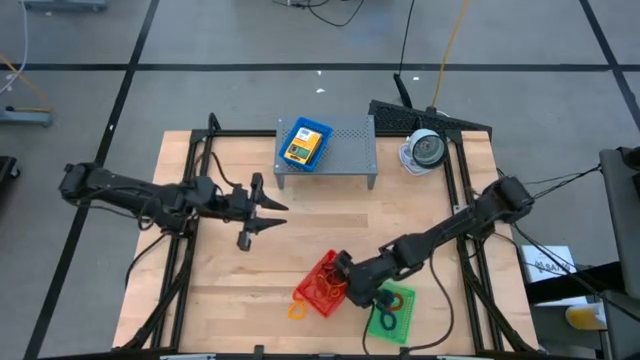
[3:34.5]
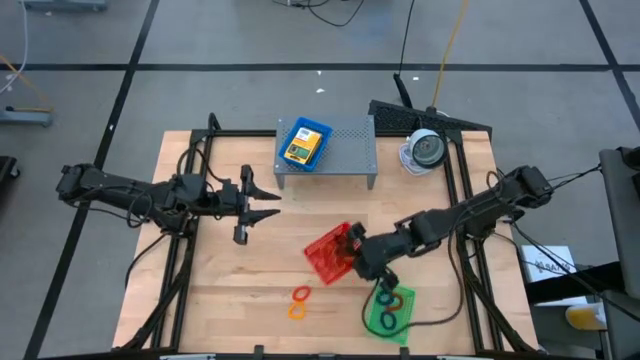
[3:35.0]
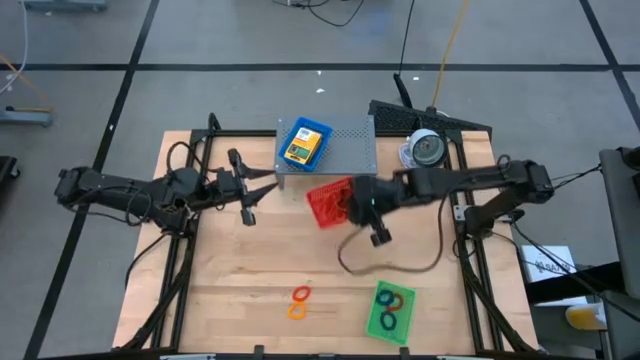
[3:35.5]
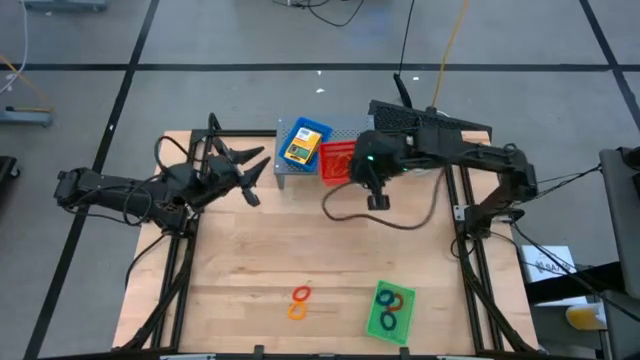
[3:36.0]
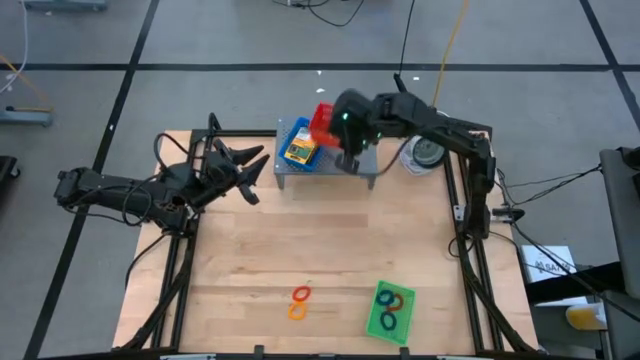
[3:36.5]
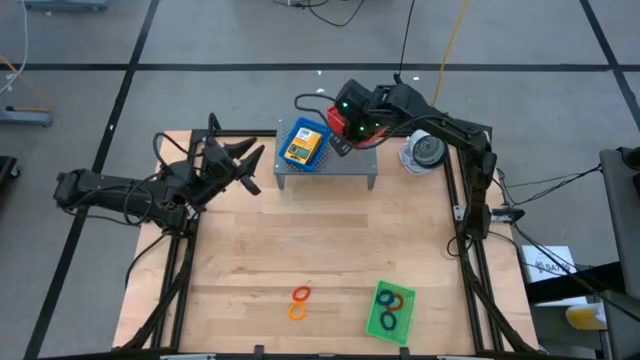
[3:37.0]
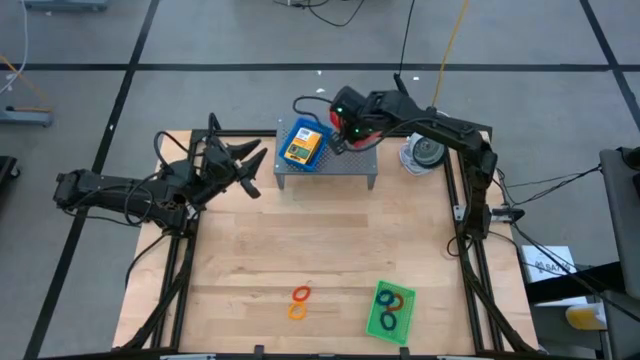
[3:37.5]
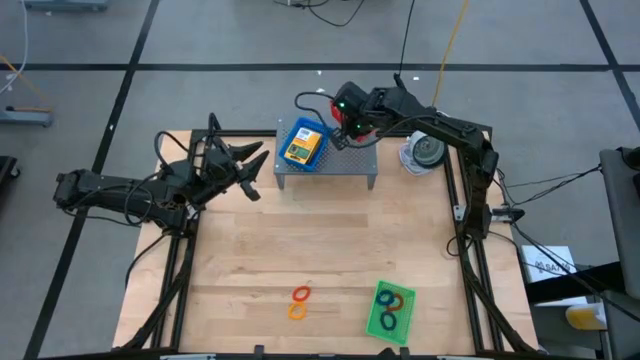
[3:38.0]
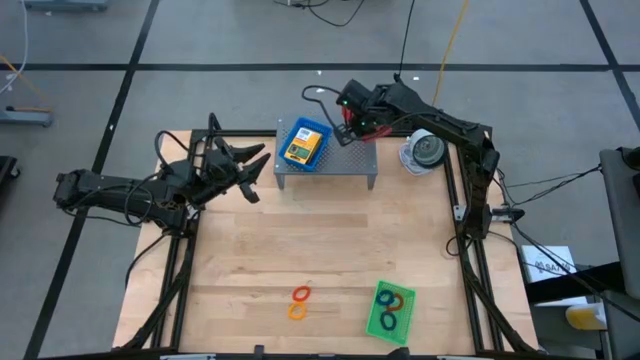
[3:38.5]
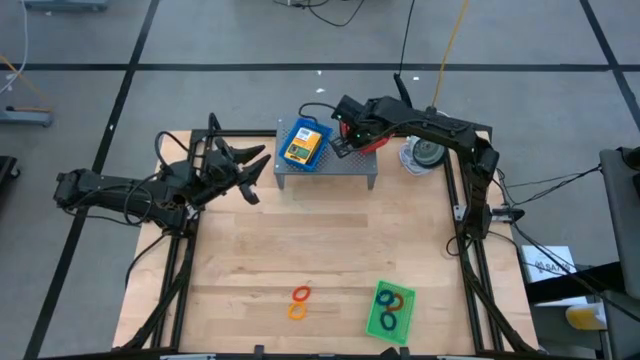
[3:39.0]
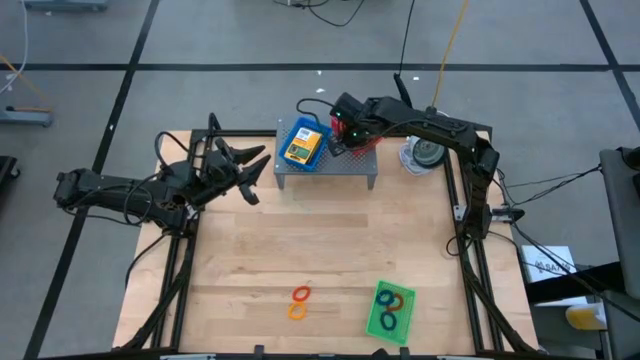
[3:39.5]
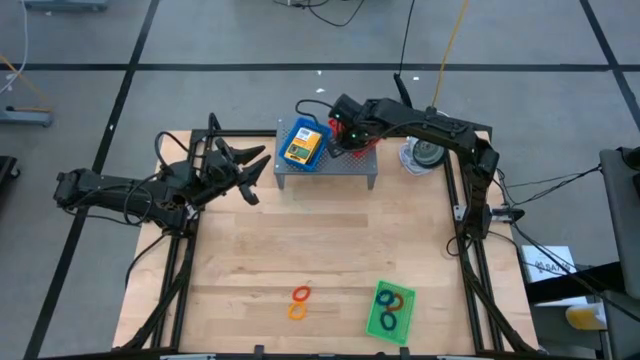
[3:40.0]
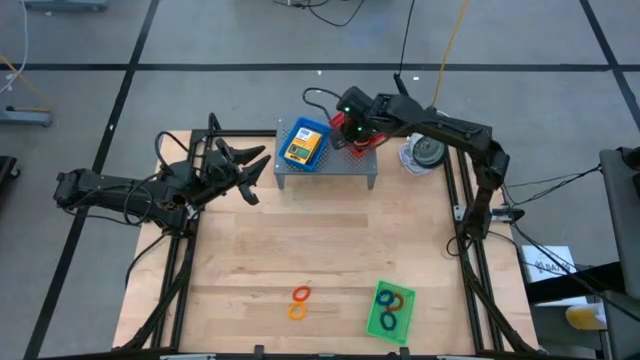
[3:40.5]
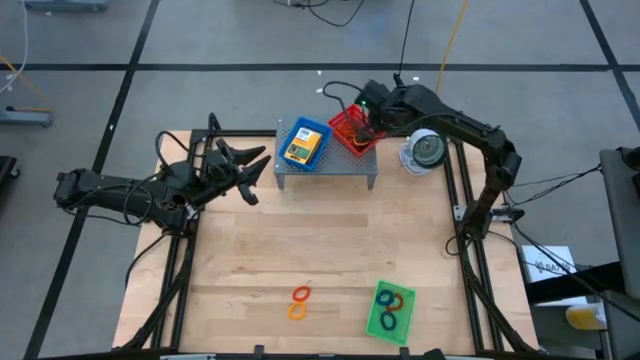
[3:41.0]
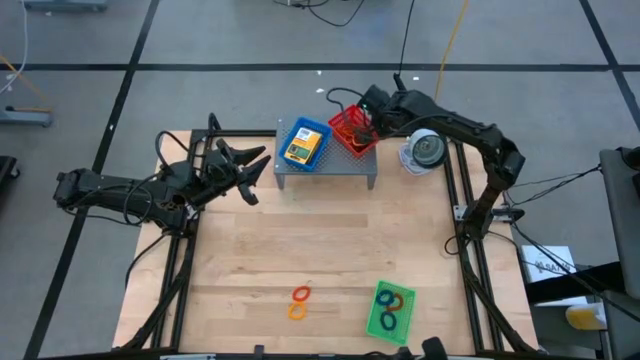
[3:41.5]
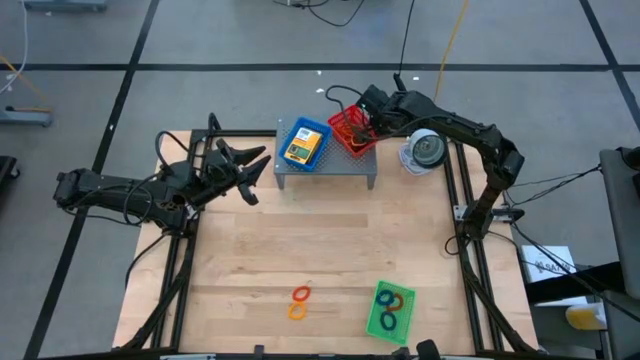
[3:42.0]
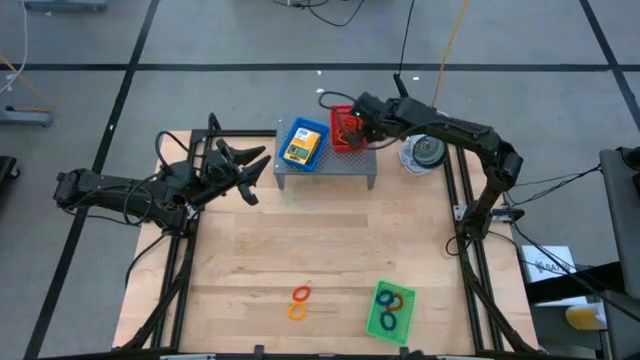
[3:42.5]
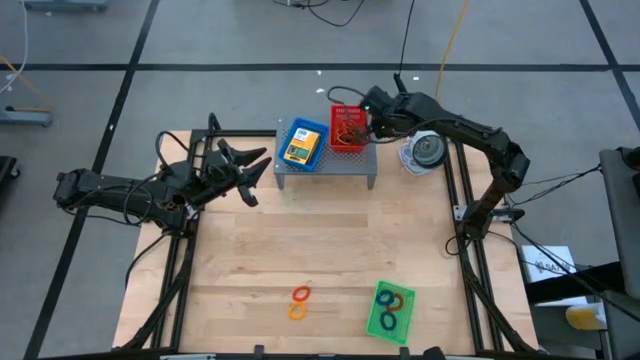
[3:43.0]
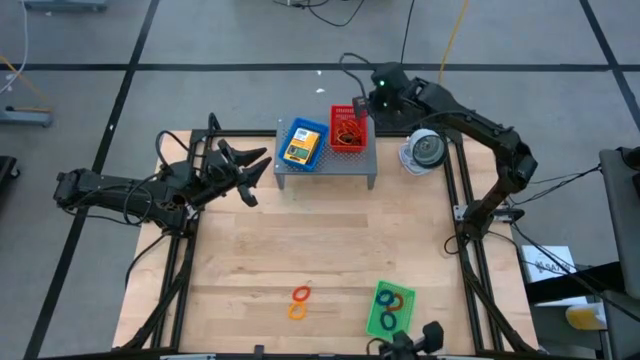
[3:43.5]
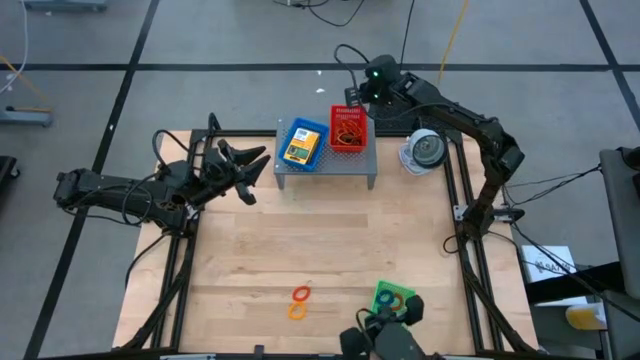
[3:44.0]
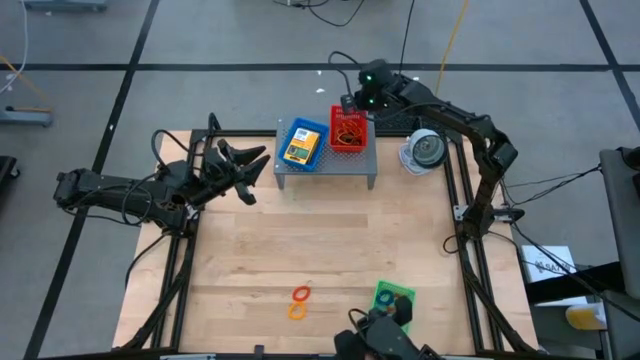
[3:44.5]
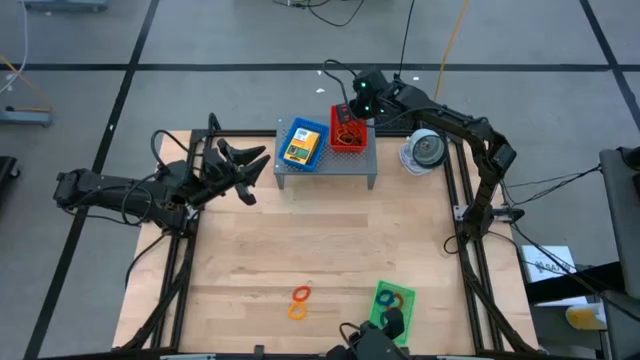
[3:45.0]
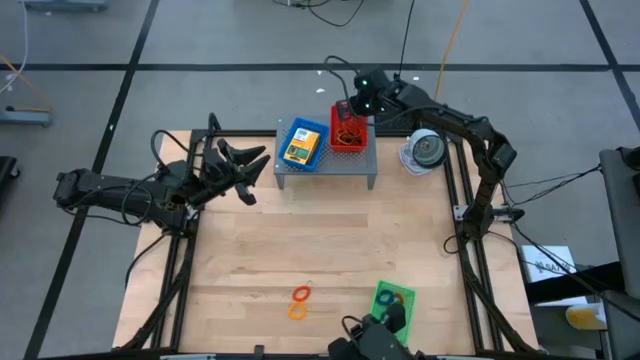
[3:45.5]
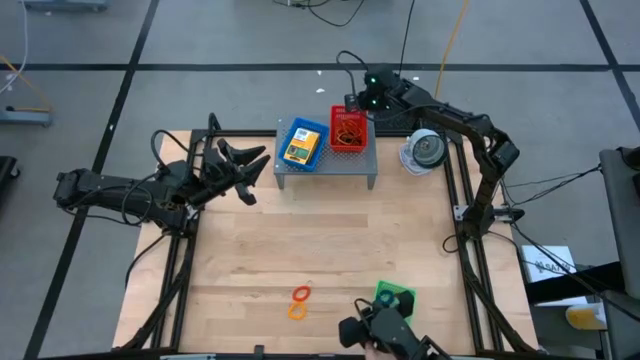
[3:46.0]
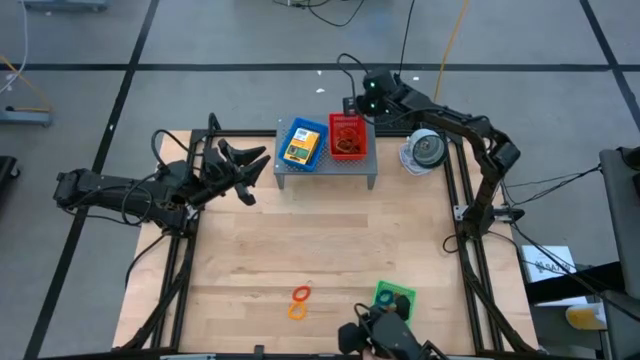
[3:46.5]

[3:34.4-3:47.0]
Task: Pick & Place Office Desk Supplies
Put the red bin on the shelf

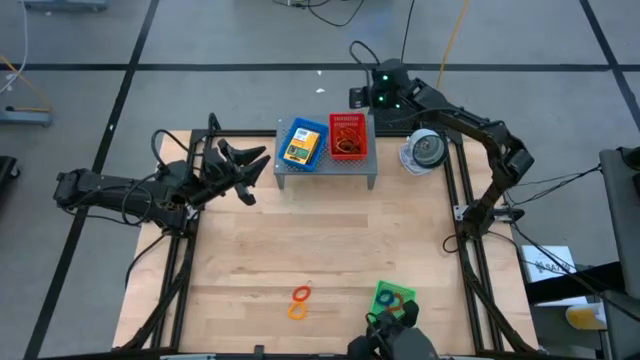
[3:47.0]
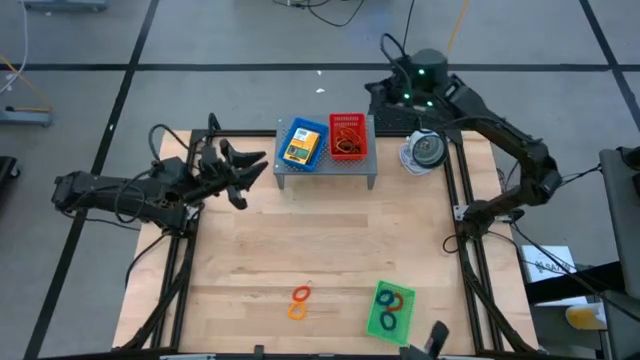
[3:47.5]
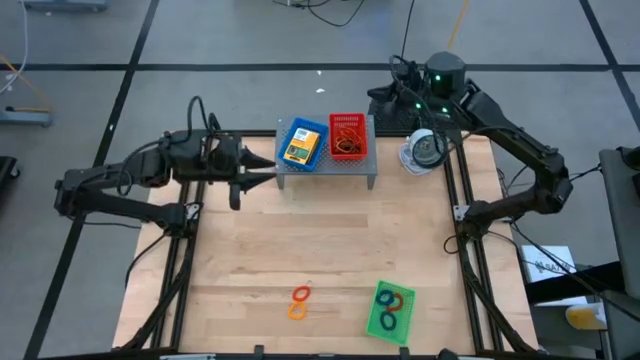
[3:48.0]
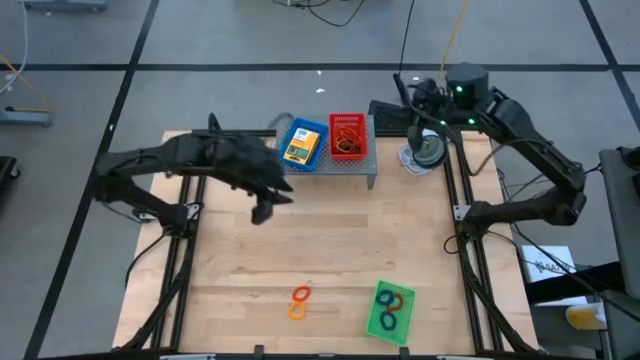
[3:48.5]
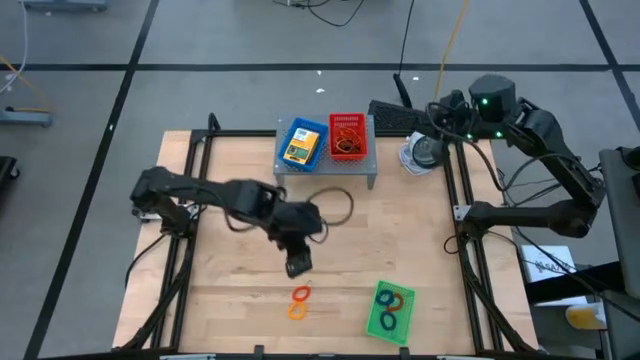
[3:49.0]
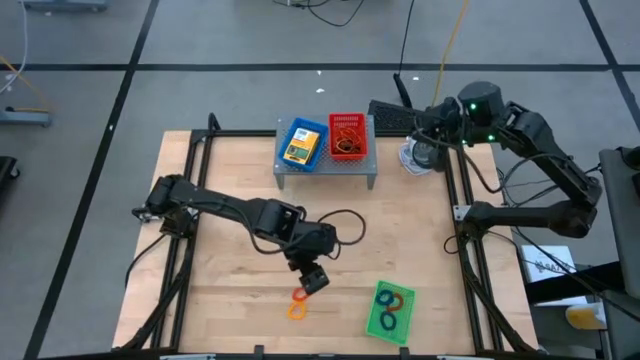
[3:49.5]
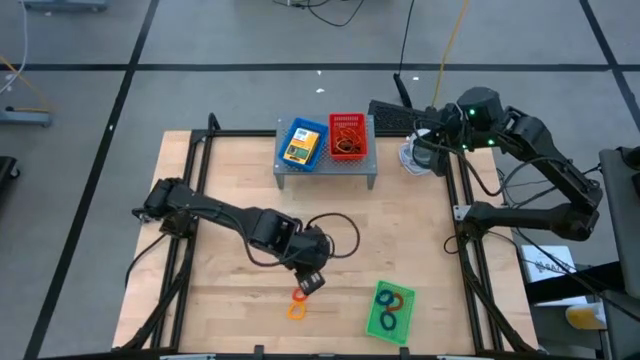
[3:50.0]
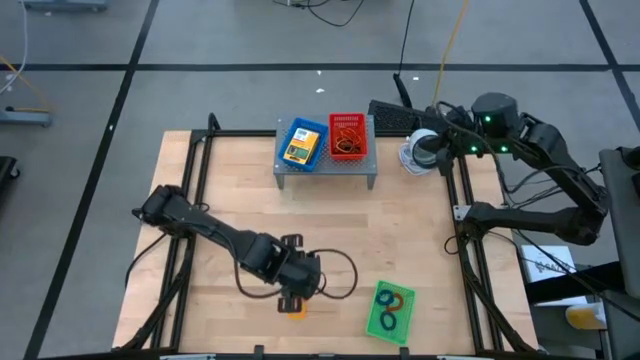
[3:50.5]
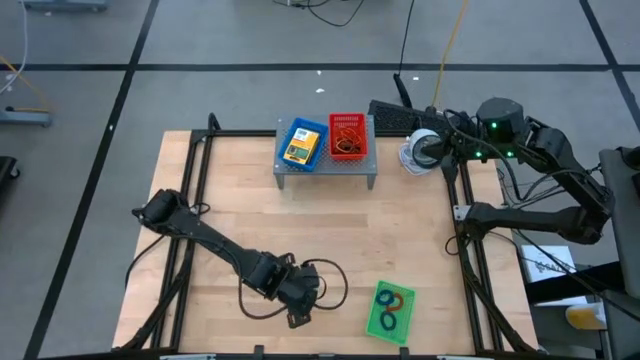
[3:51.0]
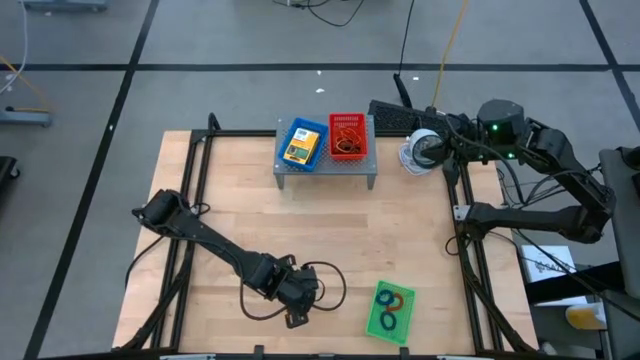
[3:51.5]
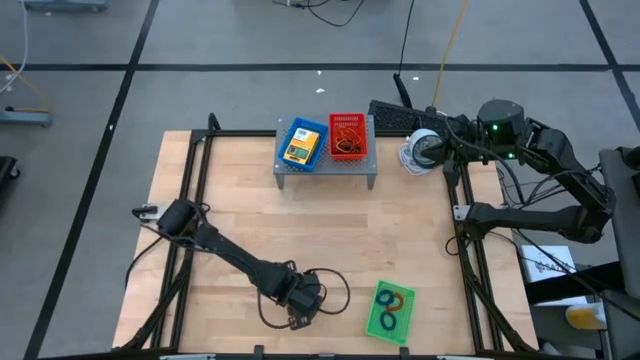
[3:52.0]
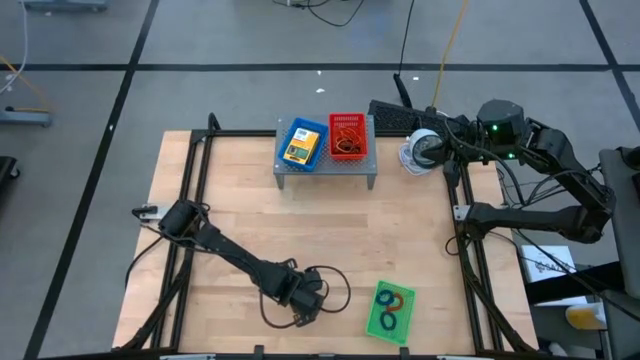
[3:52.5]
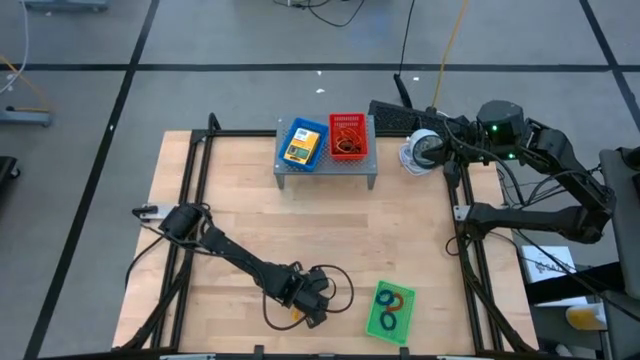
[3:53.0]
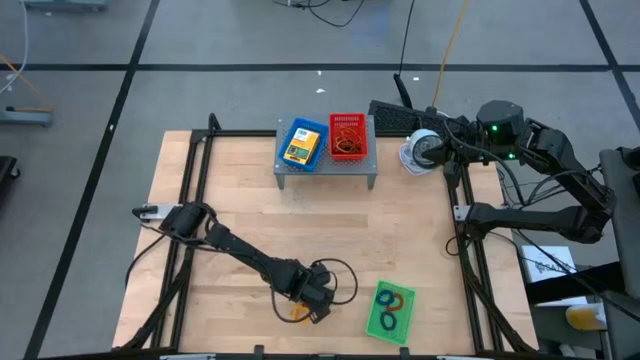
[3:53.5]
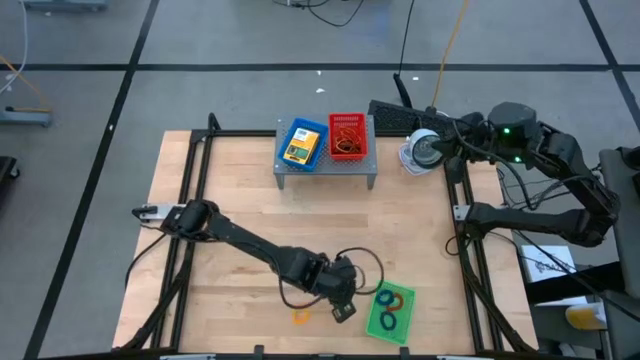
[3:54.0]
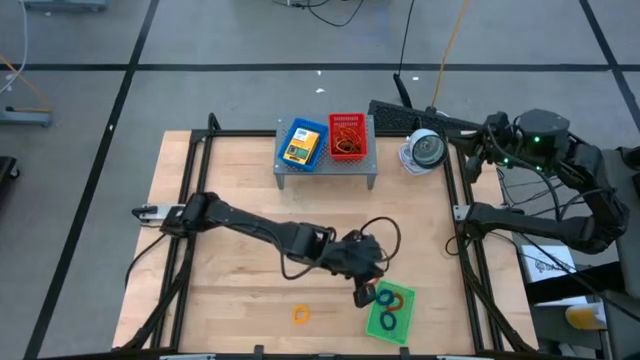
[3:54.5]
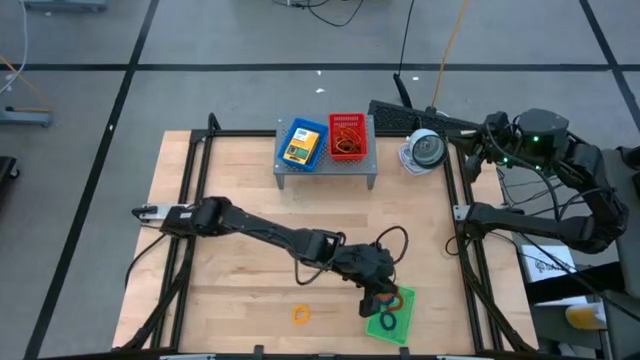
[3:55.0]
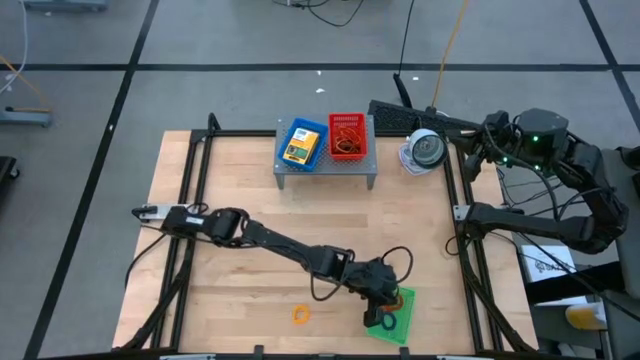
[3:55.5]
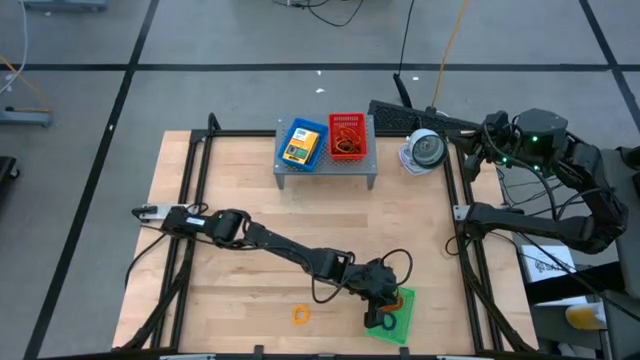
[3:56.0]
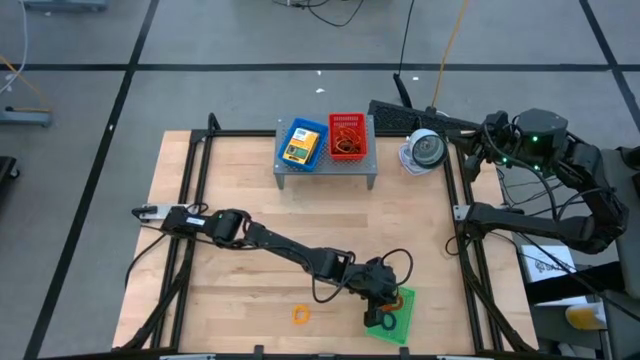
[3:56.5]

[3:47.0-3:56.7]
Put the orange spring rubberband into the green bin
